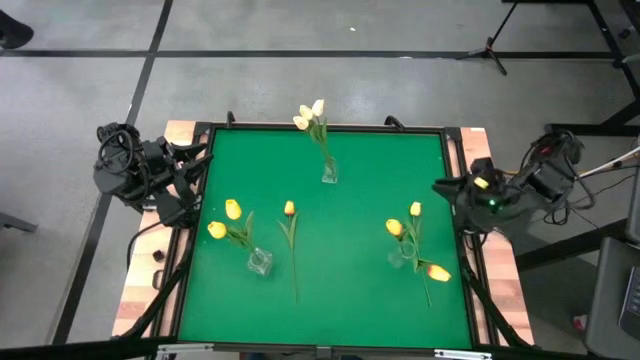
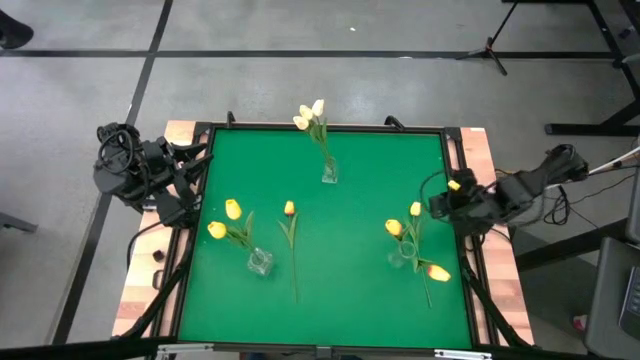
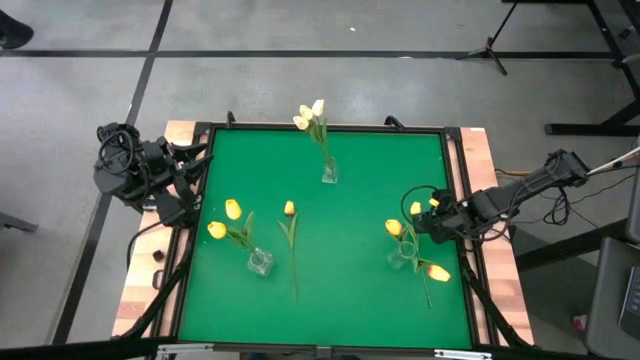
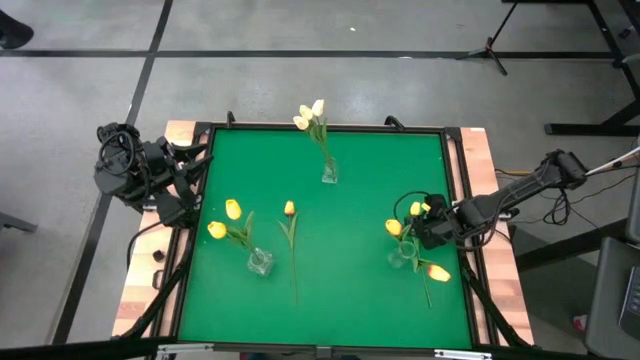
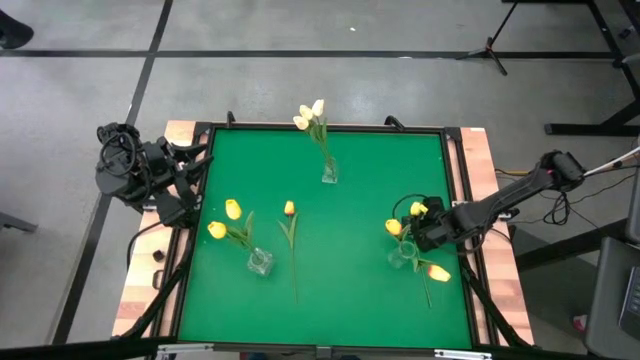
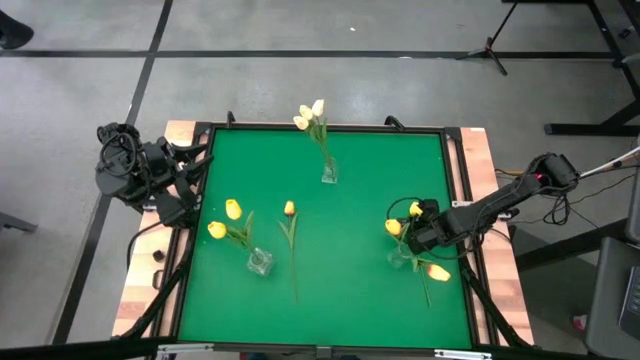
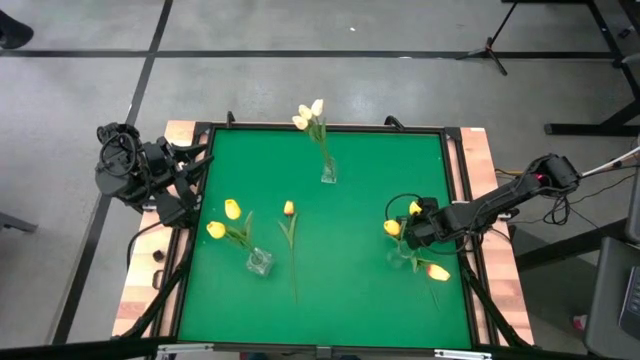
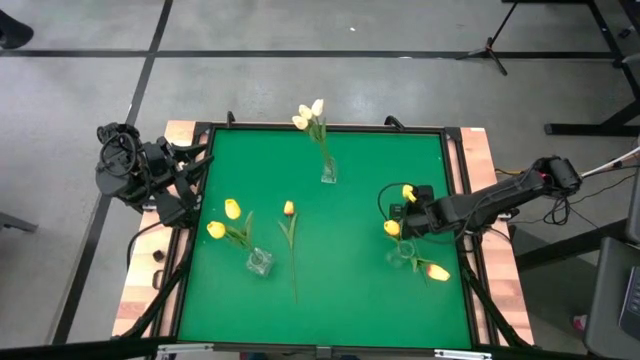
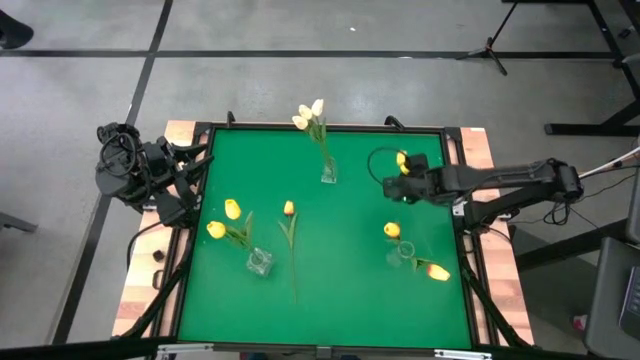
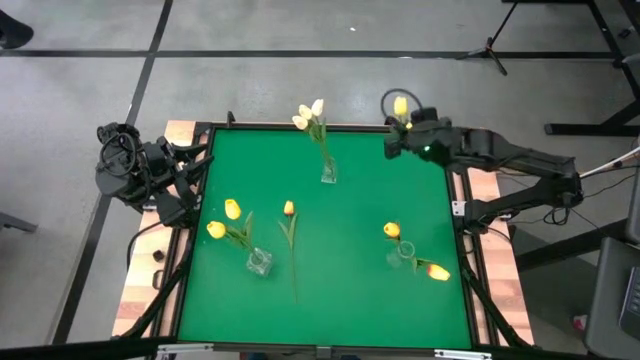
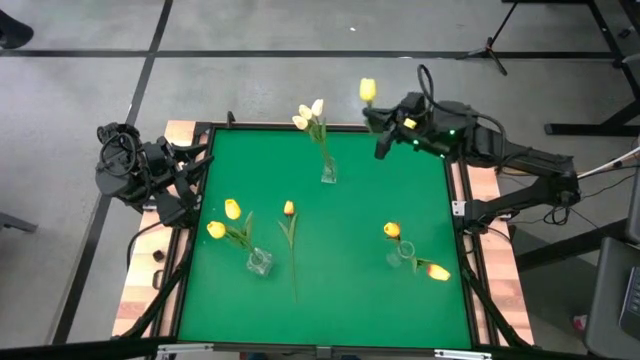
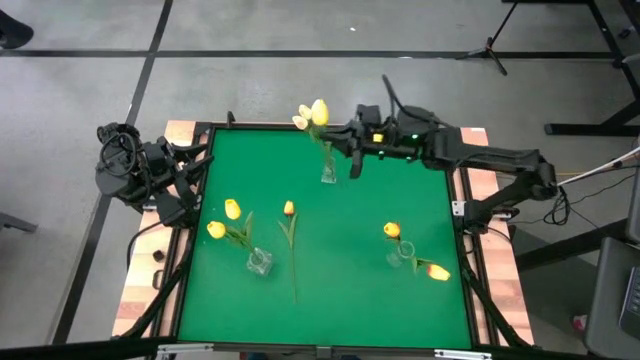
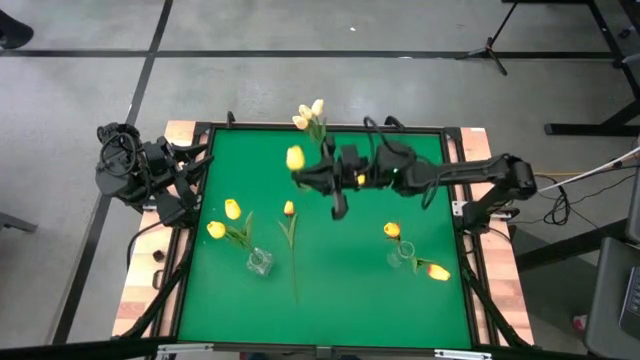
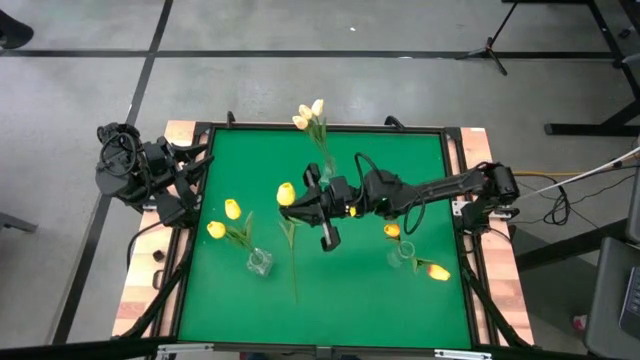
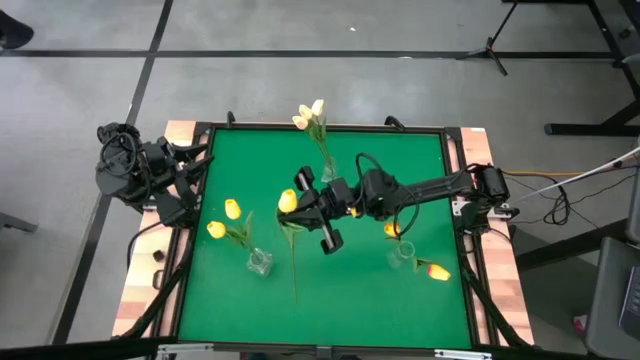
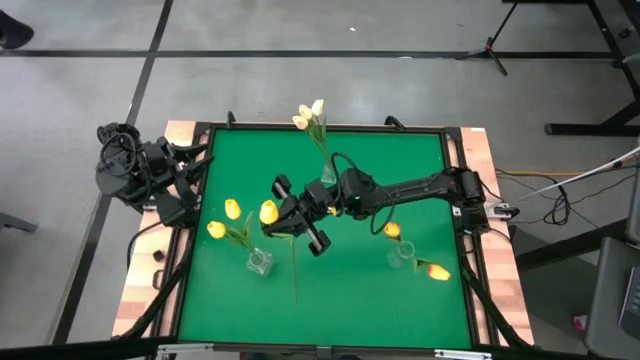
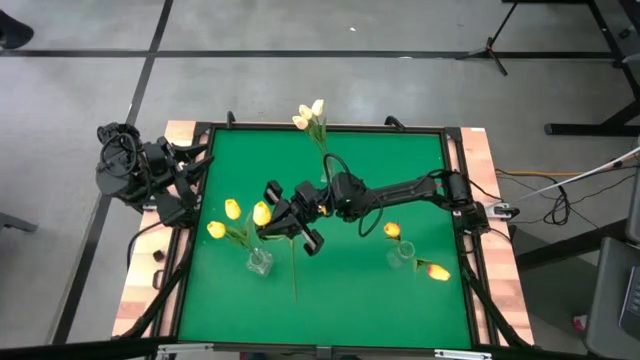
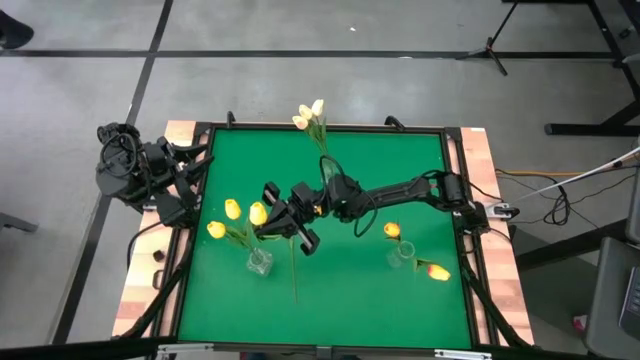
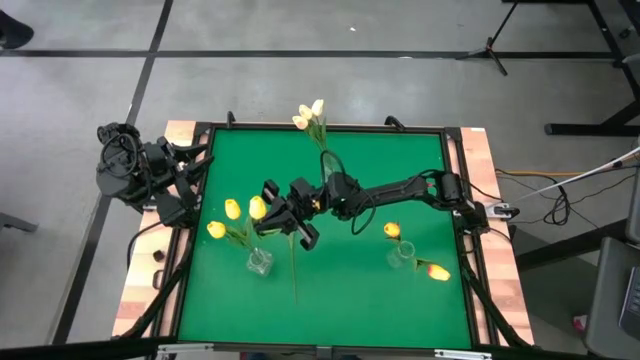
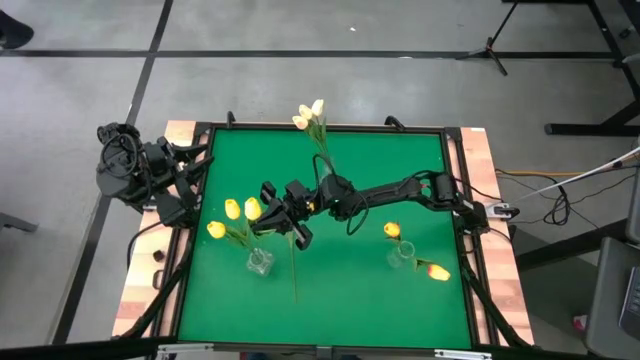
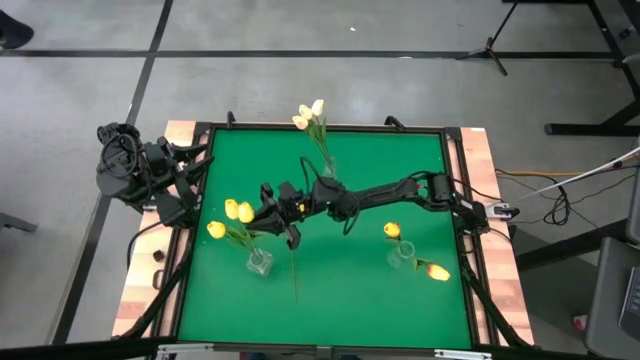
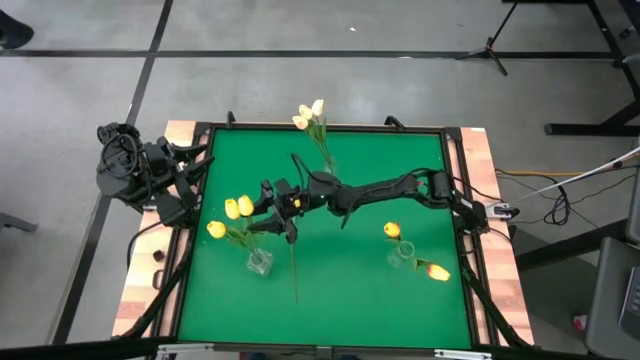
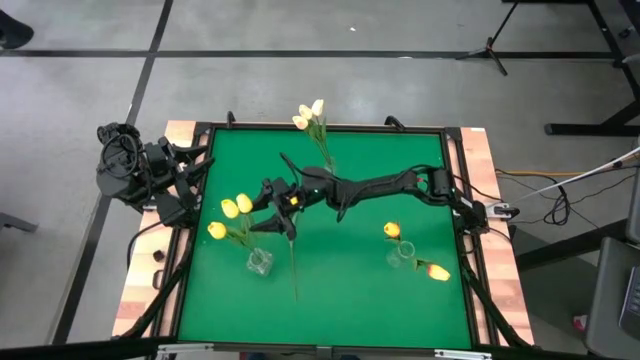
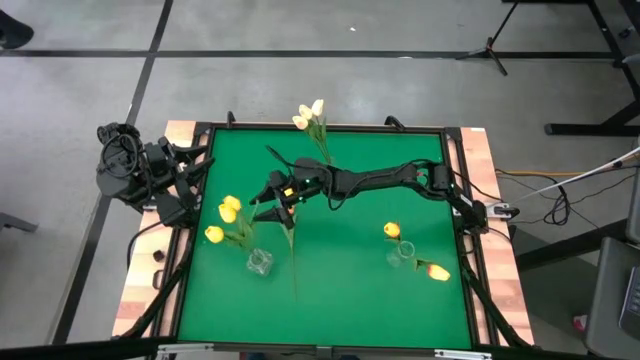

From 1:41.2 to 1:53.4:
Task: Sort flowers into vase by color
Put the yellow tulip into the bottom left transparent vase

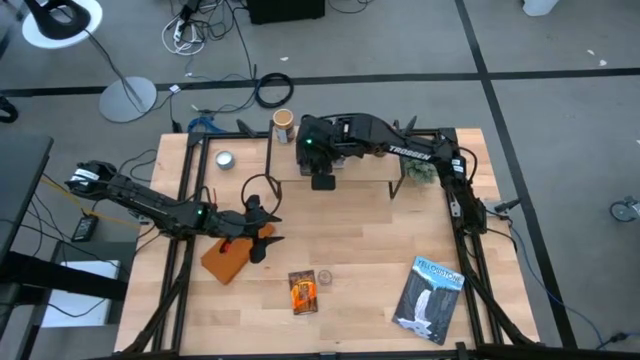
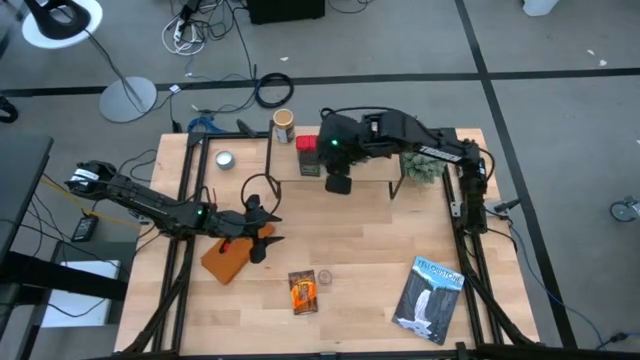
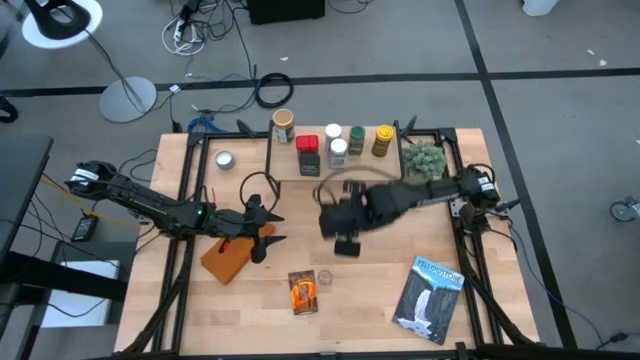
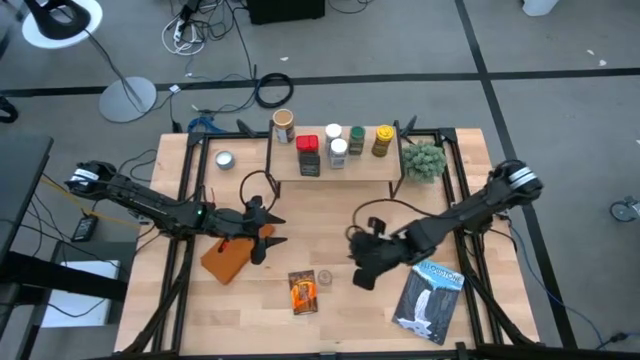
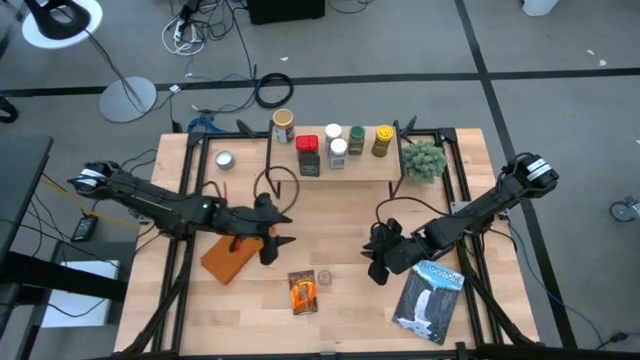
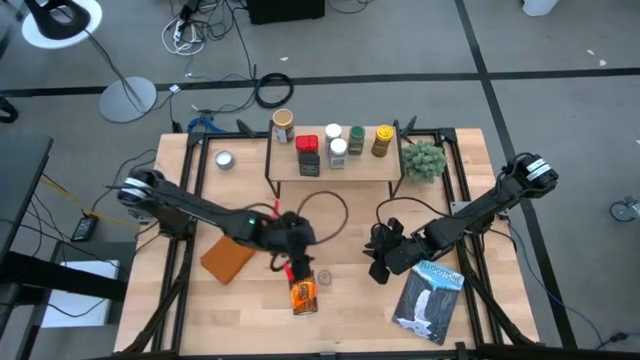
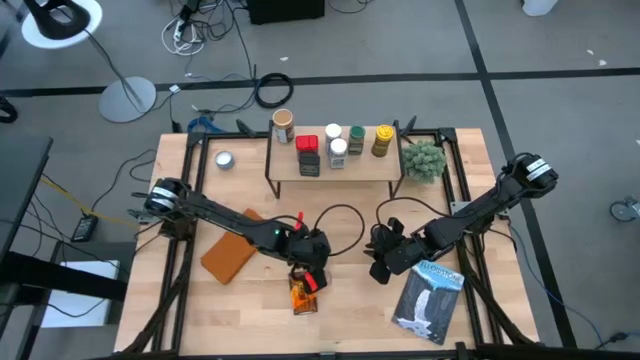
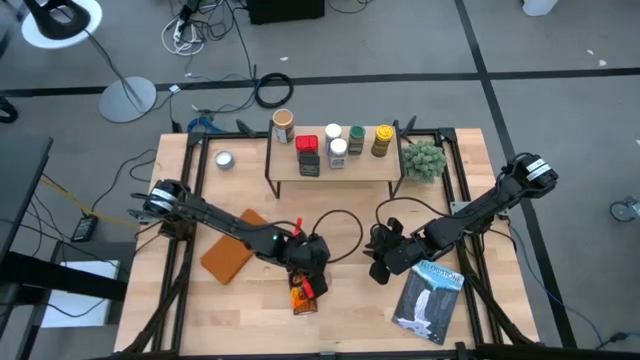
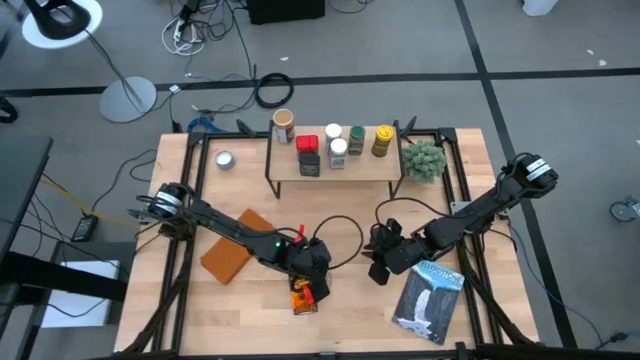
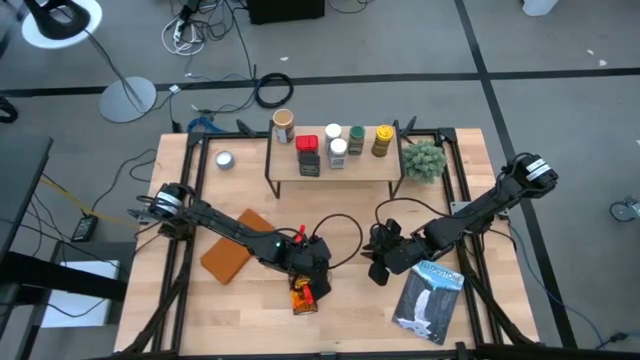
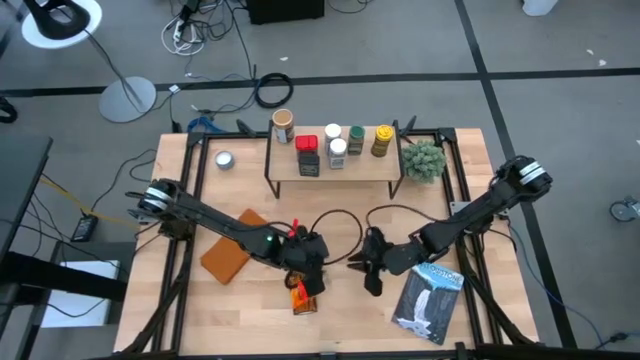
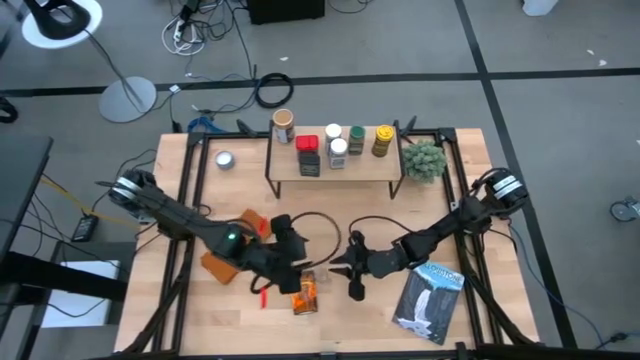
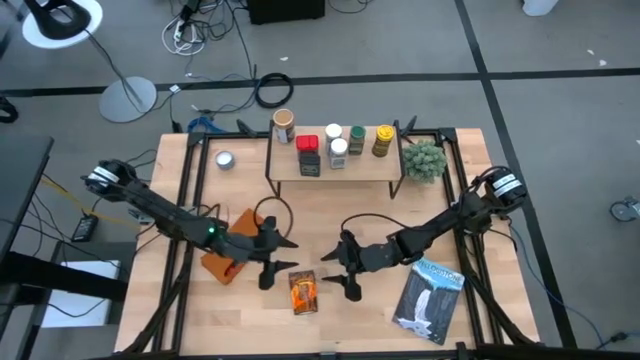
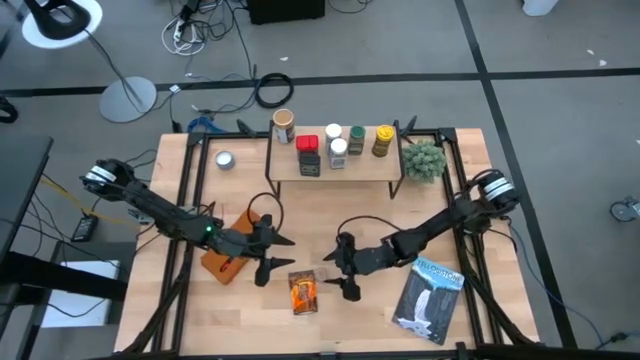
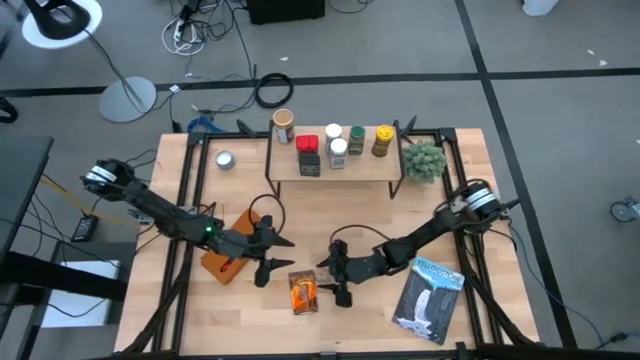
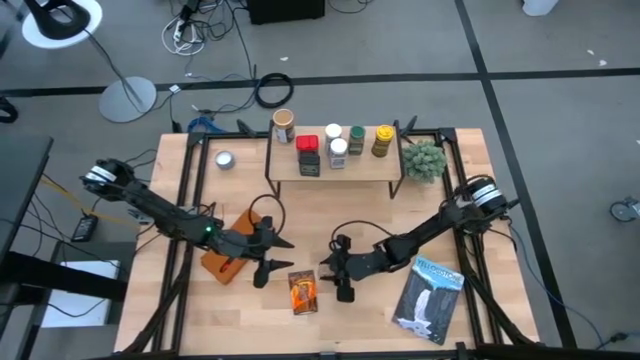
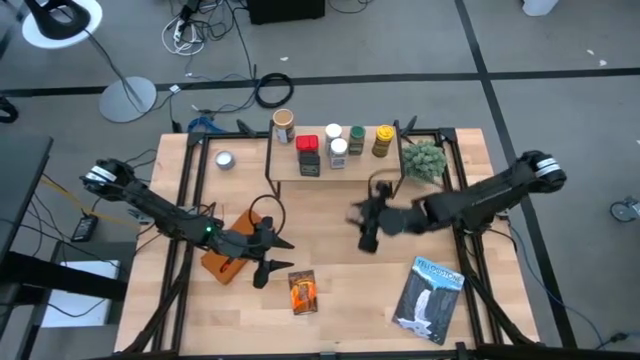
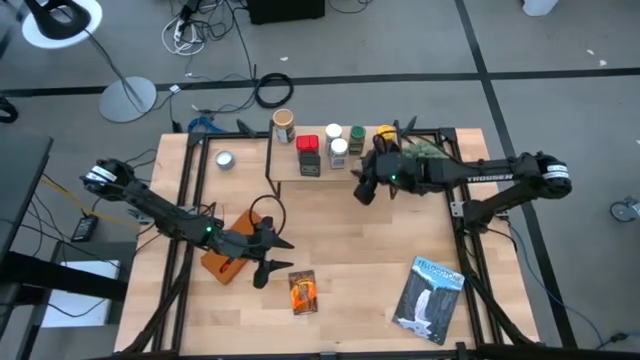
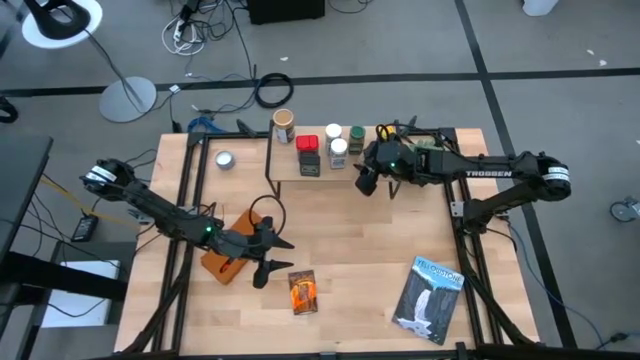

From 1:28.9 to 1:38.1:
Task: Shelf spices
Put the transparent seasoning bottle on the shelf
